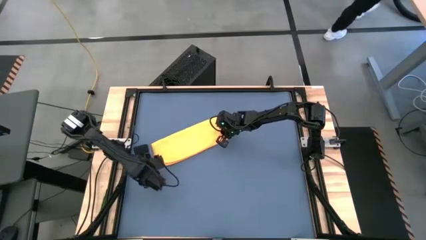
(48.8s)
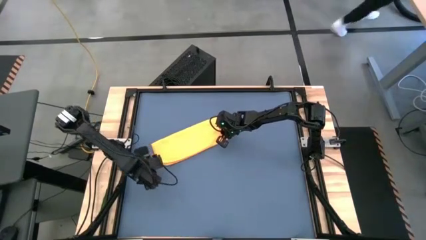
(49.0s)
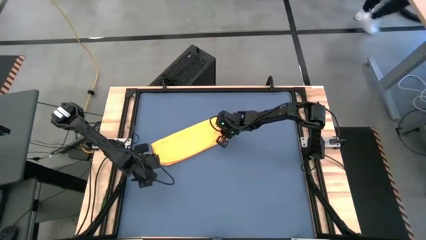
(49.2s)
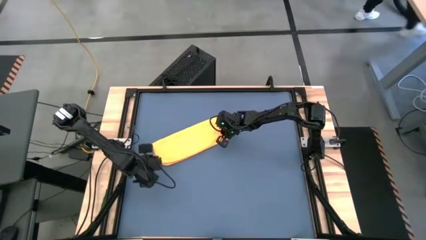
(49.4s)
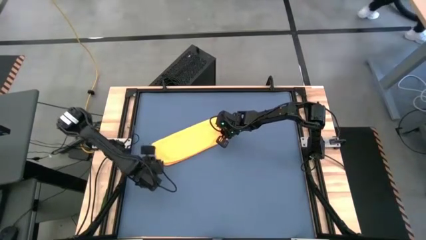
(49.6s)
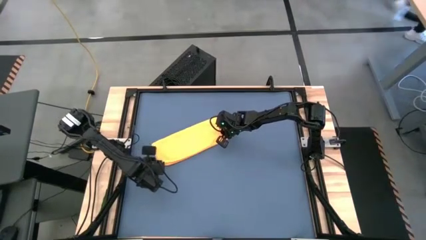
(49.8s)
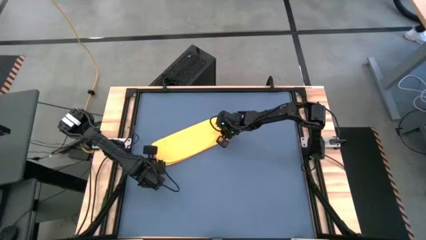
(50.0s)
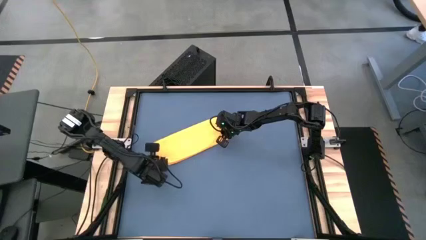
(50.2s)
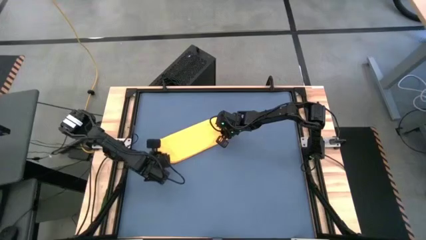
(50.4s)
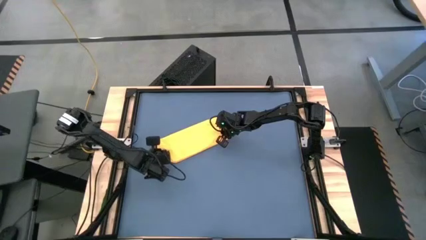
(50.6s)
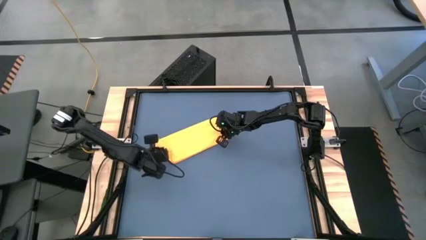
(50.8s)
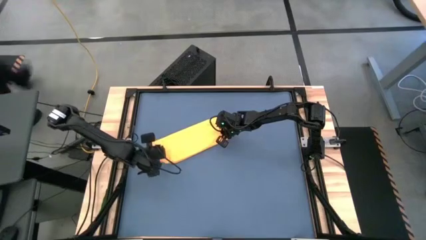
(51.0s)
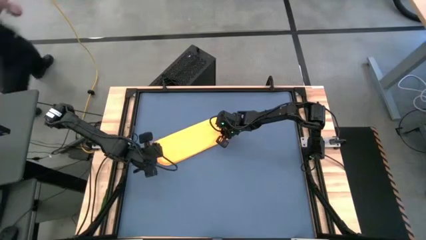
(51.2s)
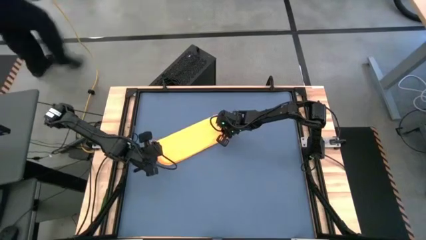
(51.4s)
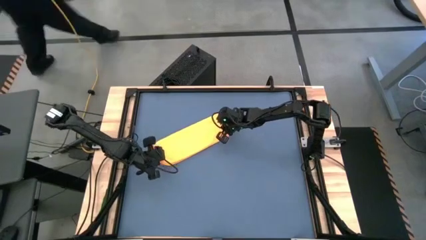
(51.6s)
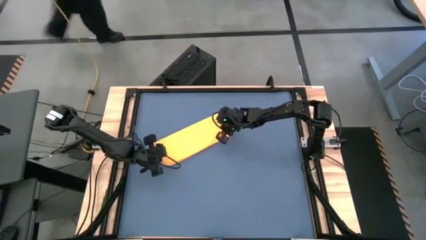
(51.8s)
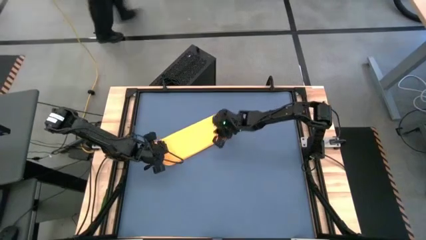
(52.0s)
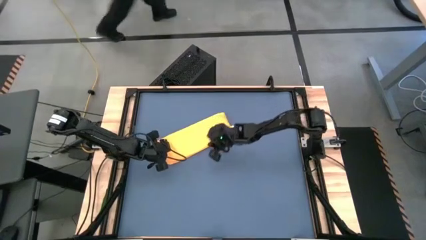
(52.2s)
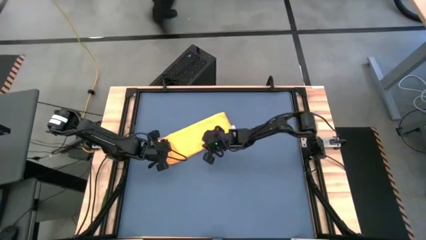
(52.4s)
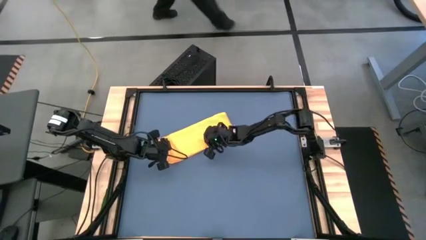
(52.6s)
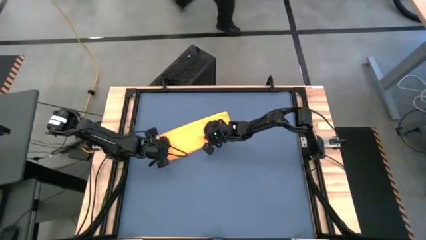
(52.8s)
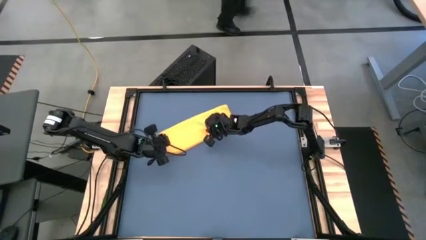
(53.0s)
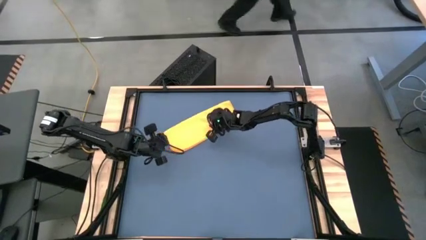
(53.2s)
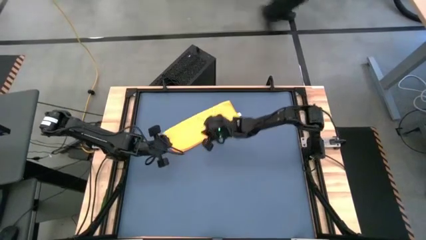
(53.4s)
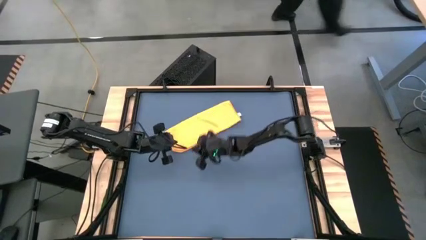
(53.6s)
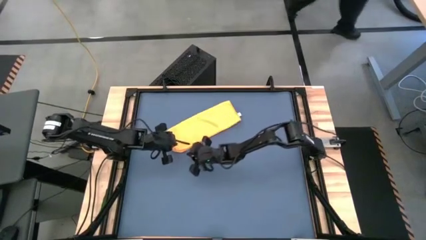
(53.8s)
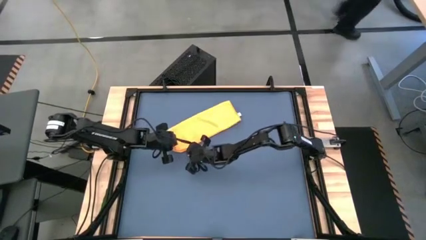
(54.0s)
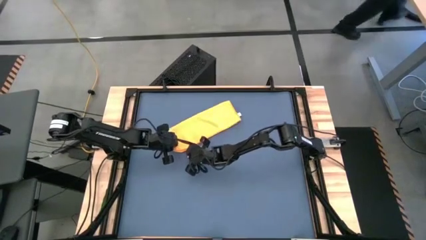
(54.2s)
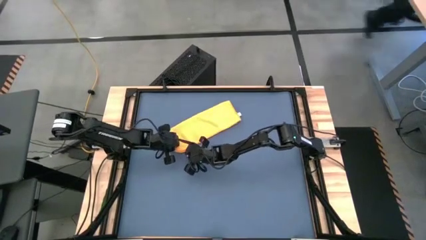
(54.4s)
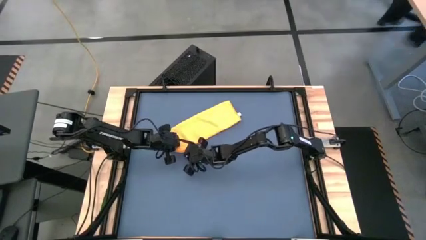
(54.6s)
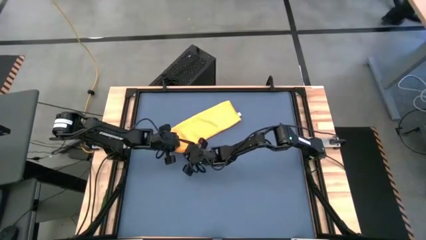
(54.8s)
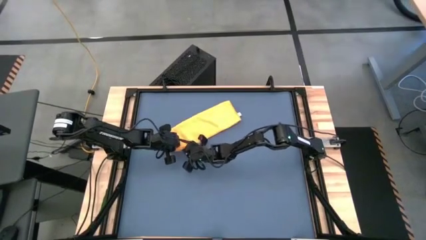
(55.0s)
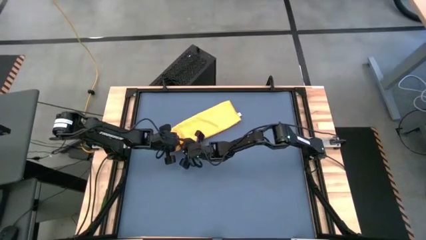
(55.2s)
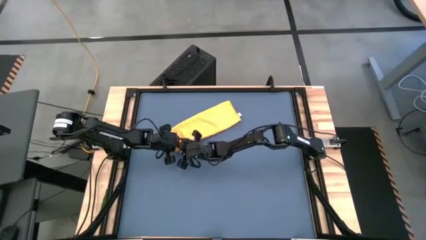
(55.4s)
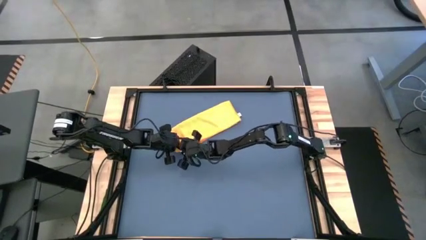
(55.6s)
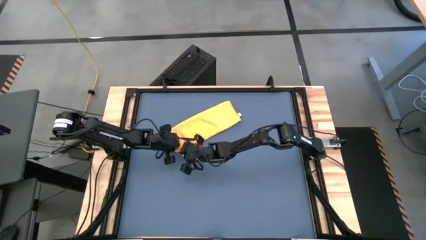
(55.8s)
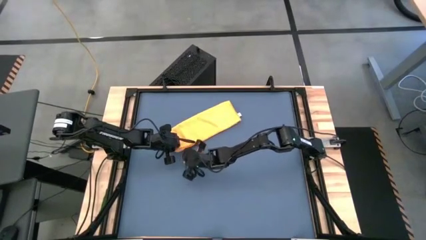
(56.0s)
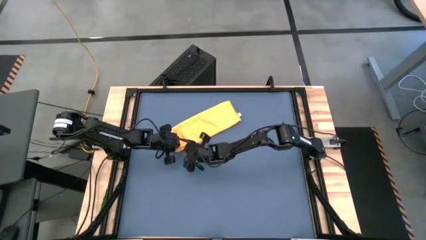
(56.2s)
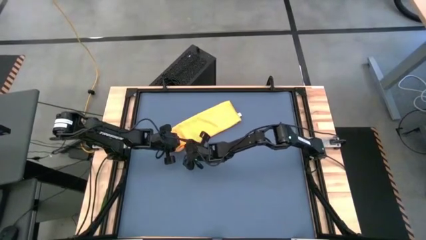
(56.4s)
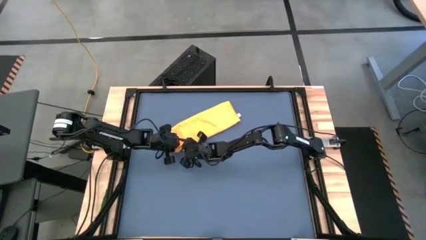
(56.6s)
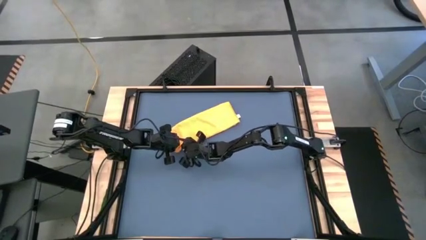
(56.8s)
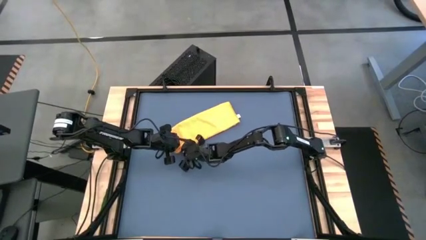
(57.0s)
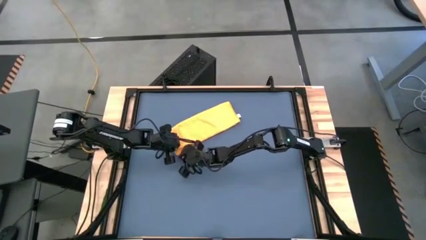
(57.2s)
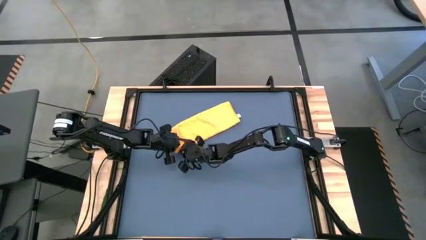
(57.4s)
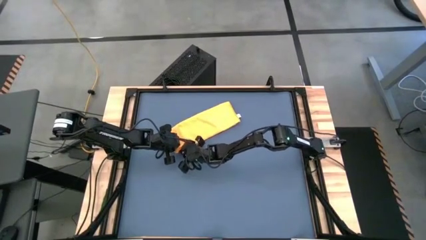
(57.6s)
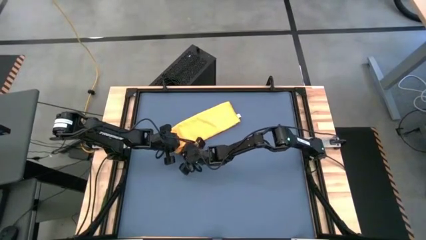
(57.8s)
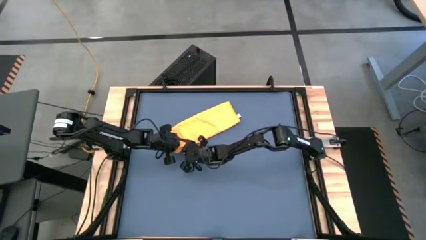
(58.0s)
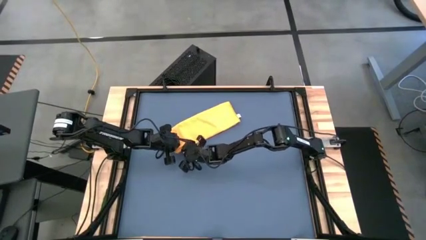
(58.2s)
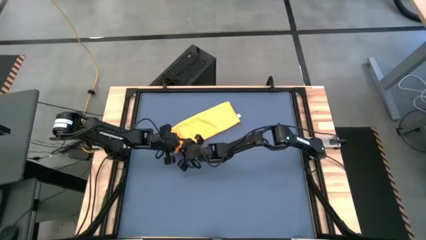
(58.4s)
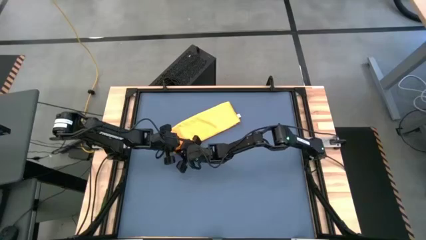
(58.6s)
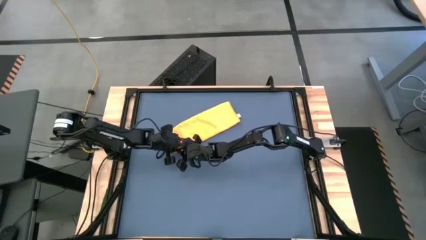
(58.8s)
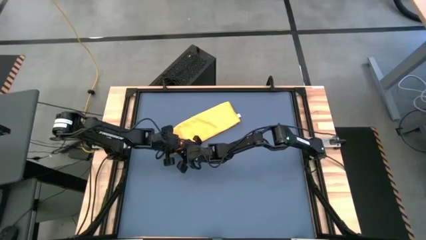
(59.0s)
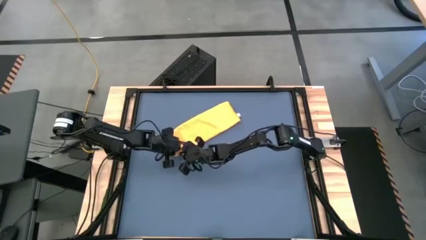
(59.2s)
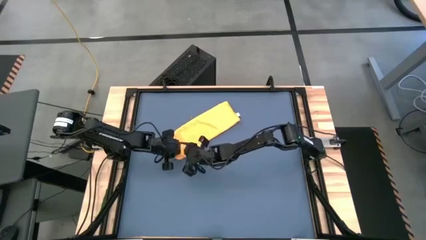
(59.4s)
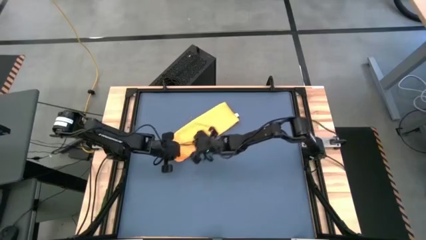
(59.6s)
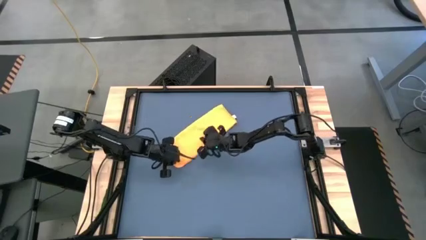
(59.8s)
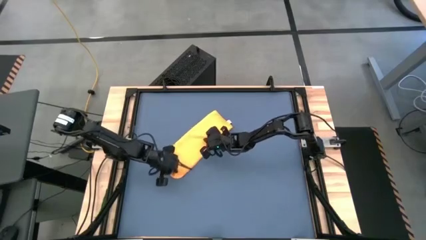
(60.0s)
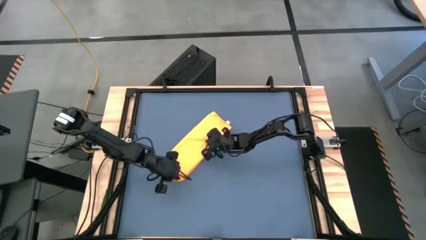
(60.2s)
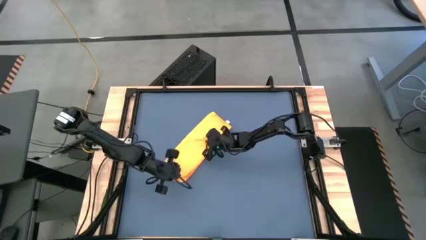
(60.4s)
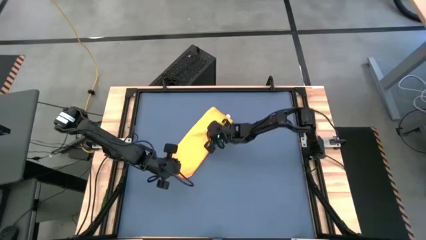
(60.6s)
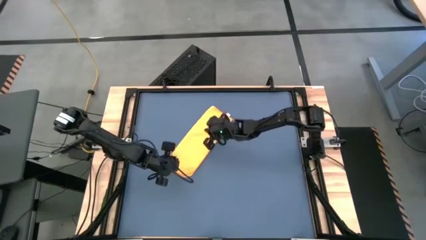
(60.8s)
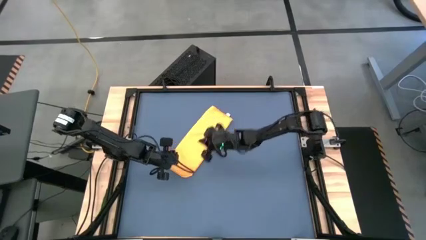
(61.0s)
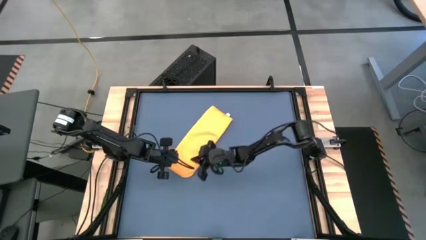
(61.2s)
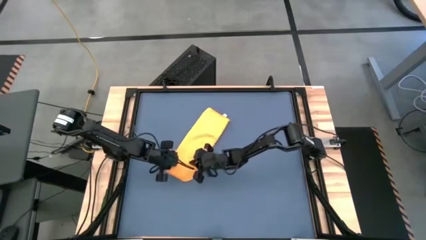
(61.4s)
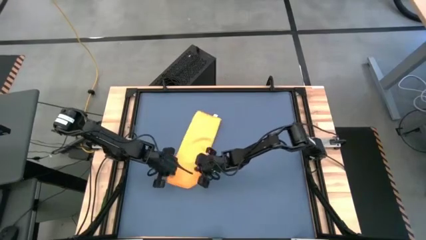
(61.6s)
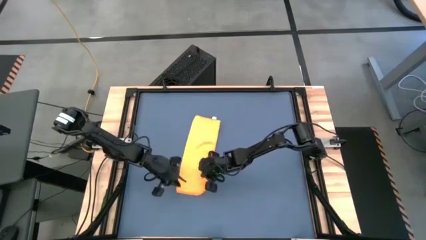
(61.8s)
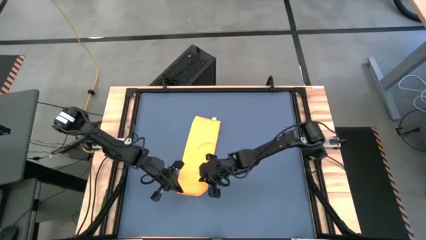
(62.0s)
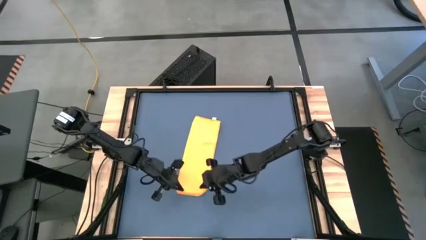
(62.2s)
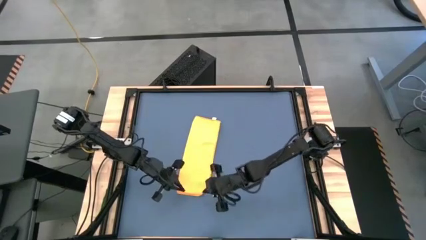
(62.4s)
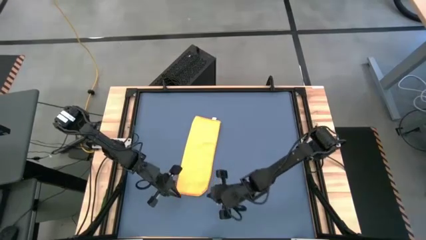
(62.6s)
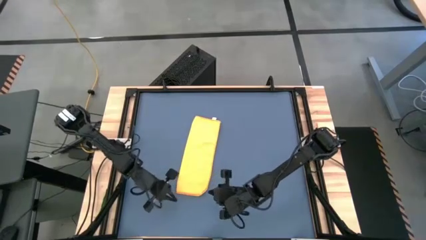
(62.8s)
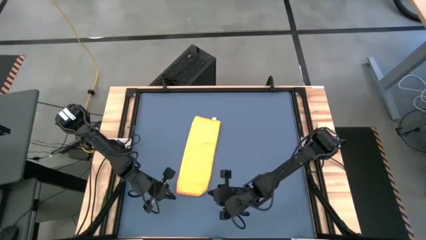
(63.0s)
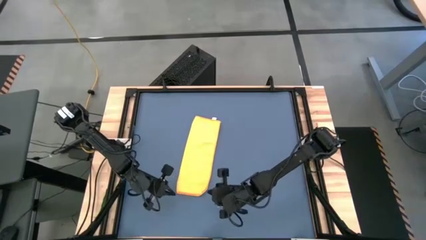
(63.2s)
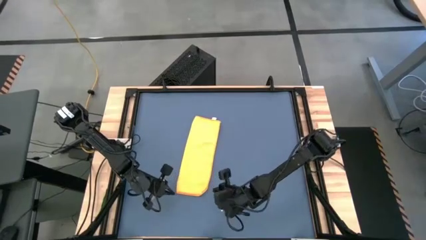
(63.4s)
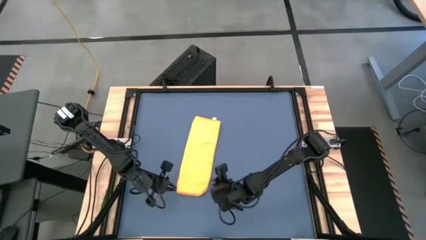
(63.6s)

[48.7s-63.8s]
Task: Roll towel
Fold the yellow microfiber cloth

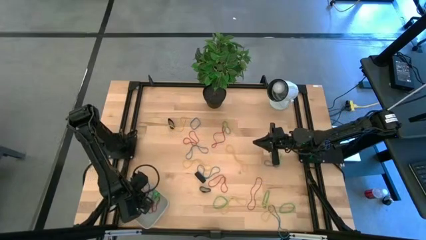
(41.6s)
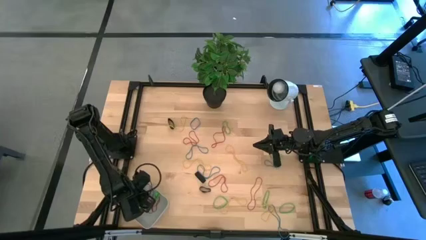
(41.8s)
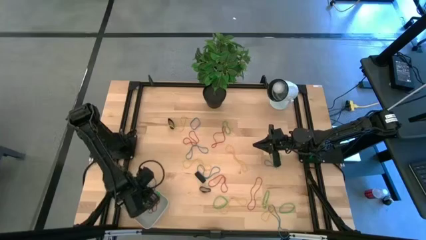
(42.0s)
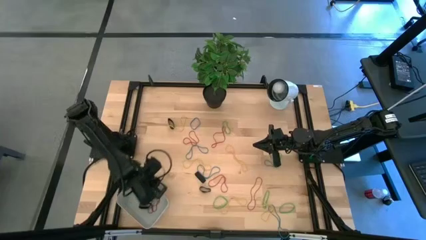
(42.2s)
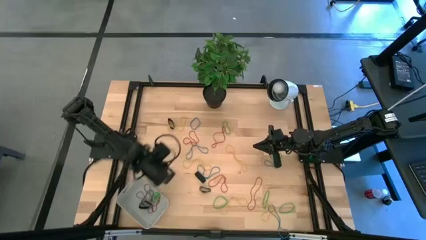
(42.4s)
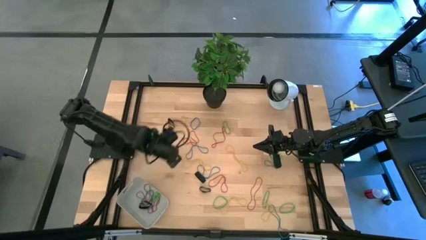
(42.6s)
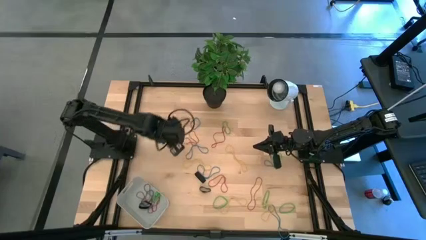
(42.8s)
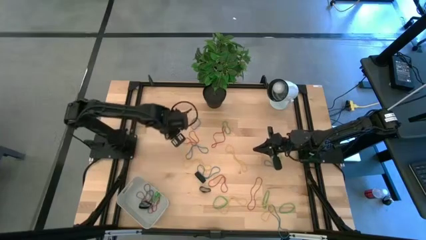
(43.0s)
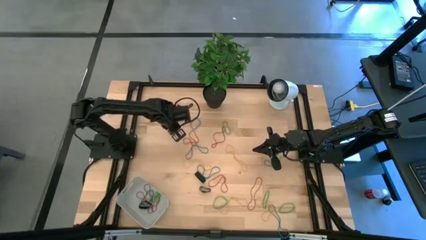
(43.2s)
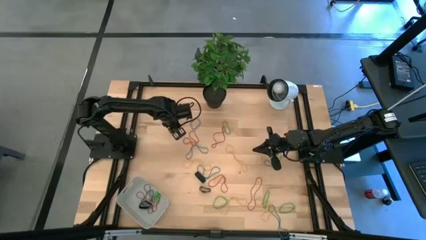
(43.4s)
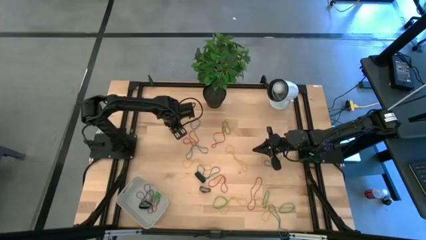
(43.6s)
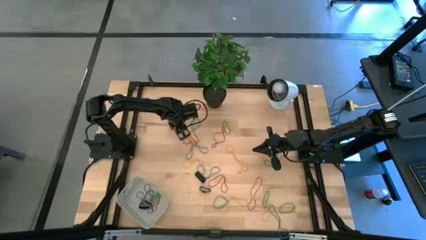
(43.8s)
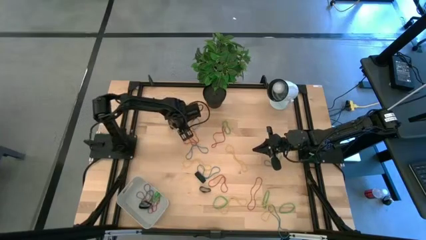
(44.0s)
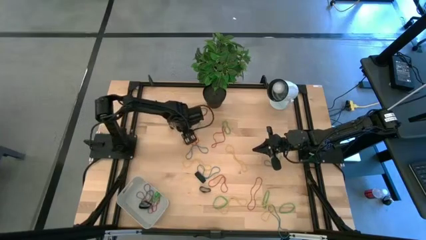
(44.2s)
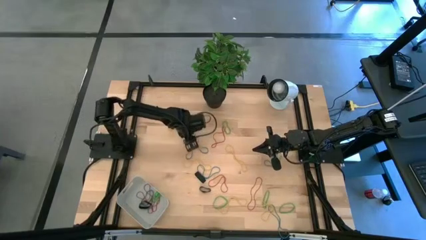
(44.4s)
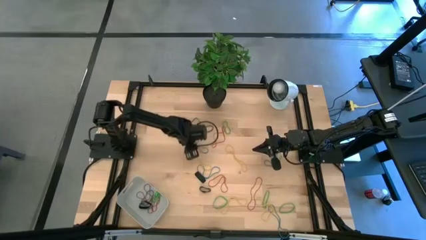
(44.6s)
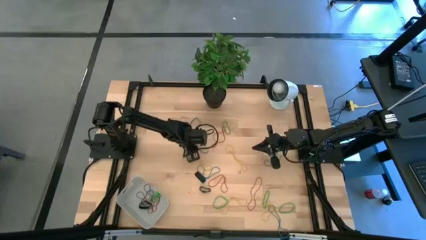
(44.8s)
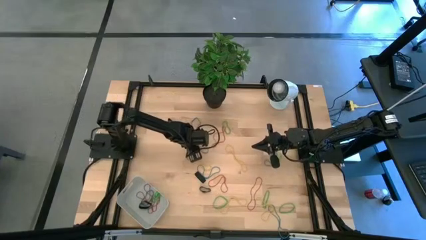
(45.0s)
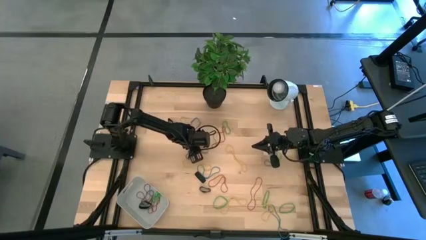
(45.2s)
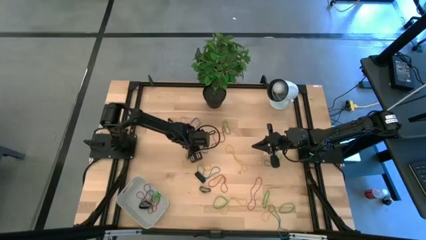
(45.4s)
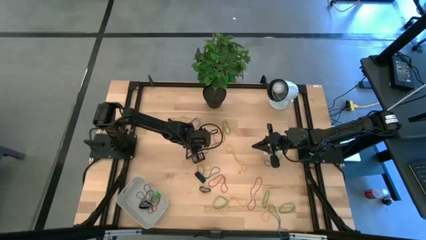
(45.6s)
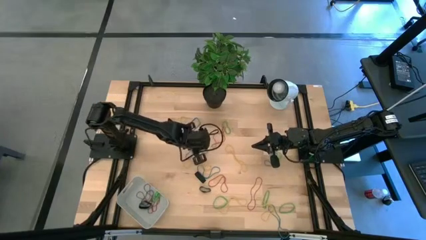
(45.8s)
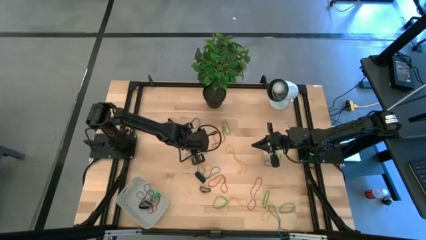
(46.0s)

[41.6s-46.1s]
Task: Pick and place rubber bands into bin
Put the blue rubber band into the gray bin
